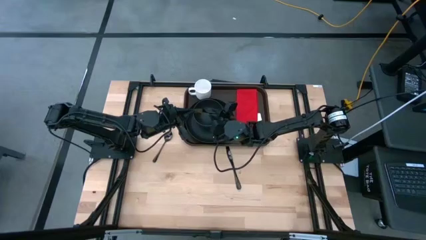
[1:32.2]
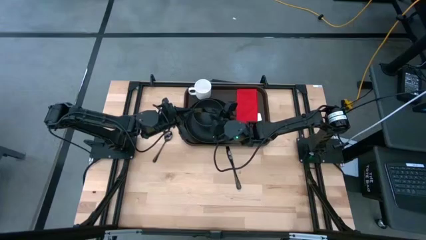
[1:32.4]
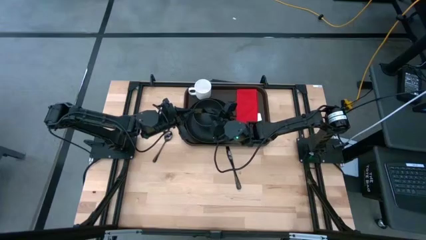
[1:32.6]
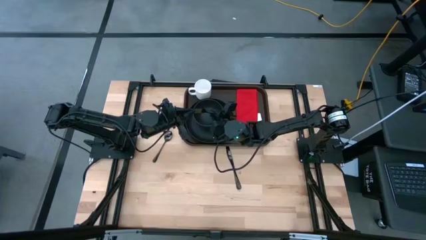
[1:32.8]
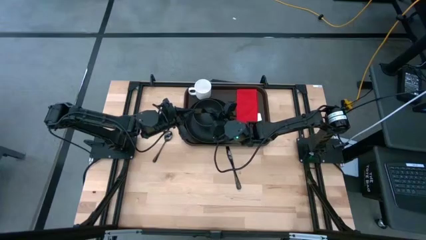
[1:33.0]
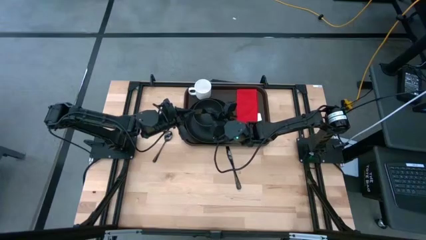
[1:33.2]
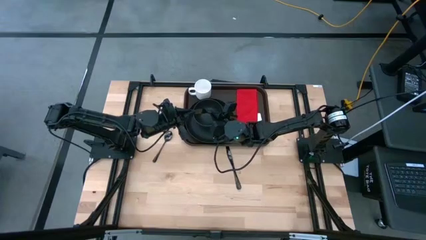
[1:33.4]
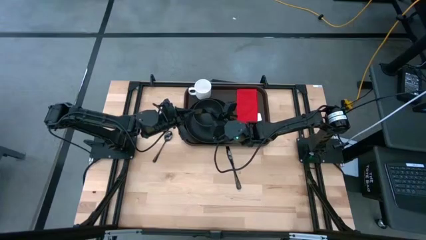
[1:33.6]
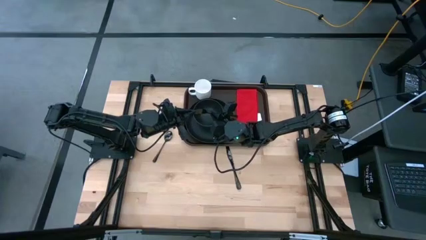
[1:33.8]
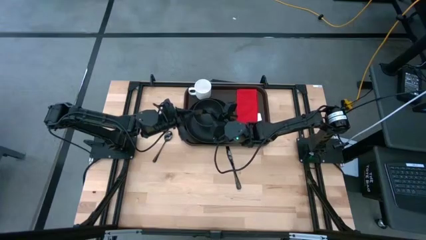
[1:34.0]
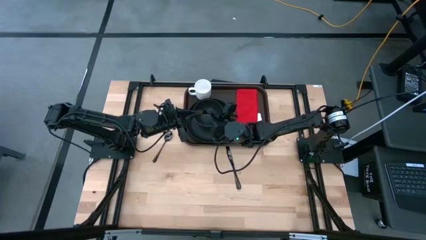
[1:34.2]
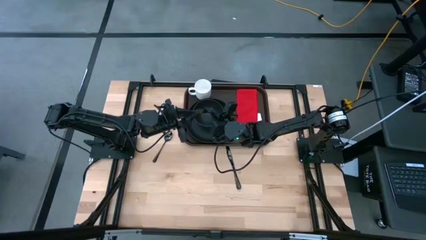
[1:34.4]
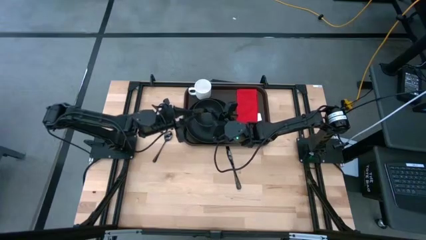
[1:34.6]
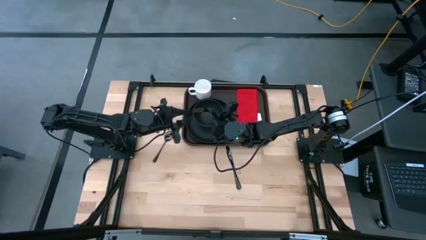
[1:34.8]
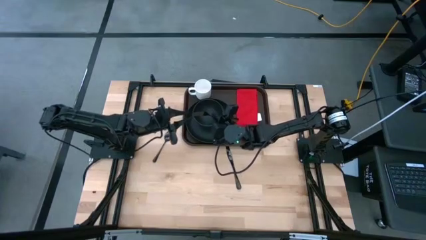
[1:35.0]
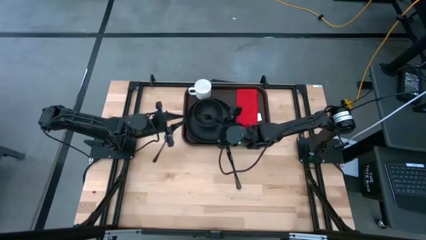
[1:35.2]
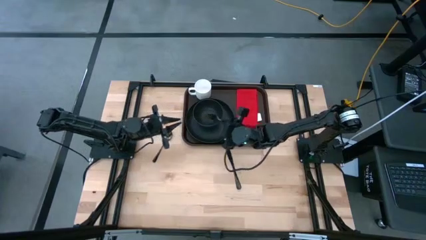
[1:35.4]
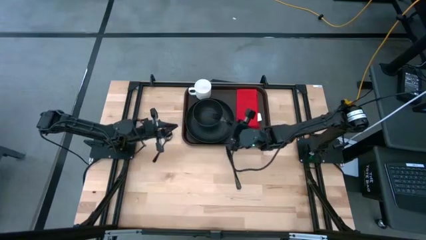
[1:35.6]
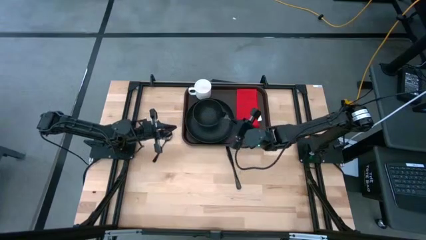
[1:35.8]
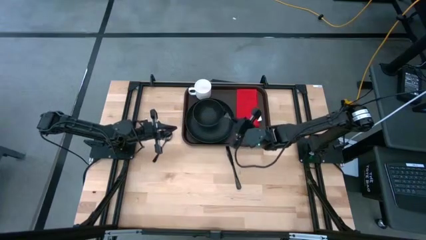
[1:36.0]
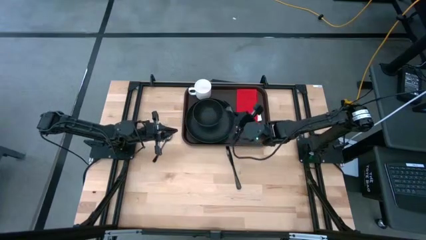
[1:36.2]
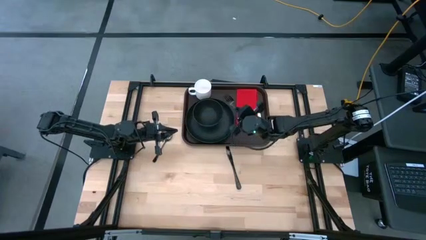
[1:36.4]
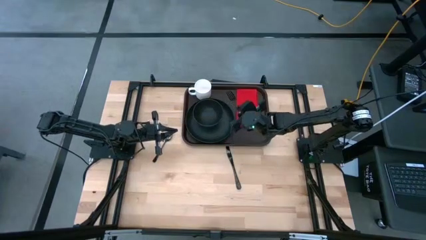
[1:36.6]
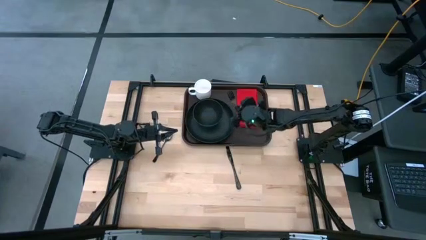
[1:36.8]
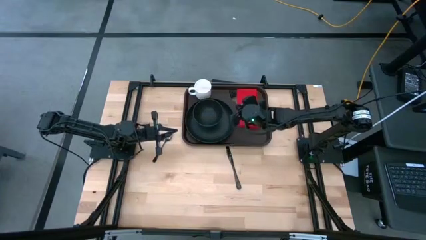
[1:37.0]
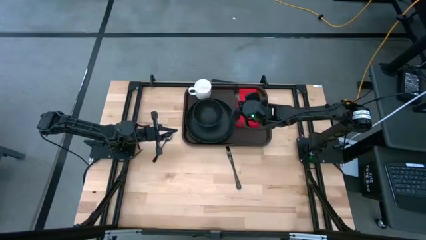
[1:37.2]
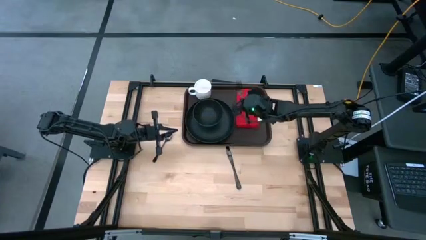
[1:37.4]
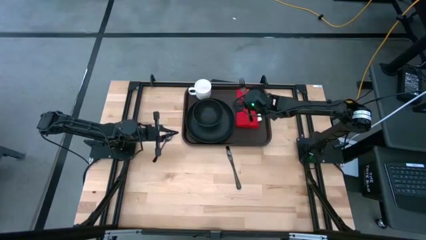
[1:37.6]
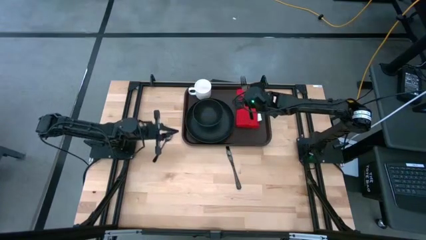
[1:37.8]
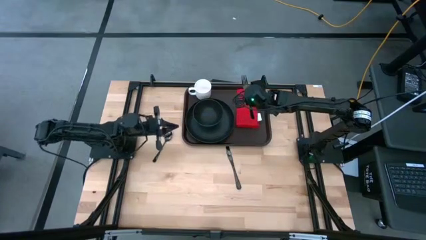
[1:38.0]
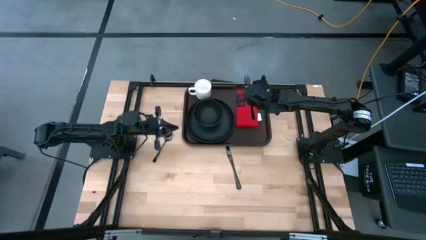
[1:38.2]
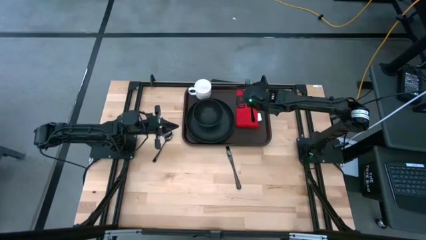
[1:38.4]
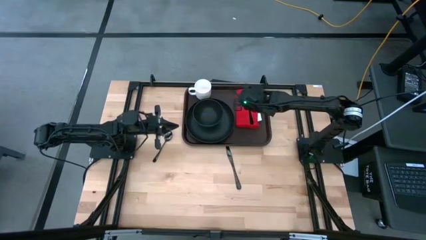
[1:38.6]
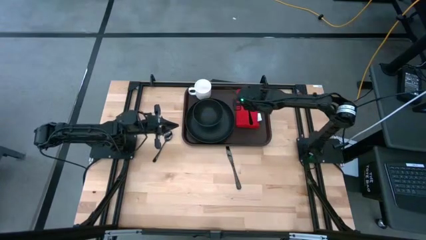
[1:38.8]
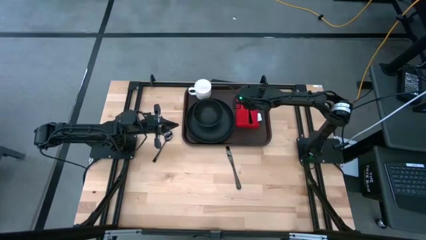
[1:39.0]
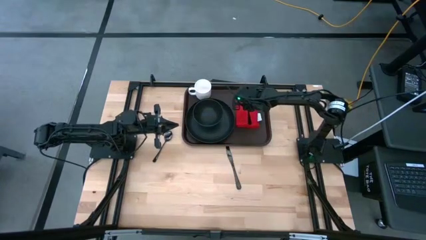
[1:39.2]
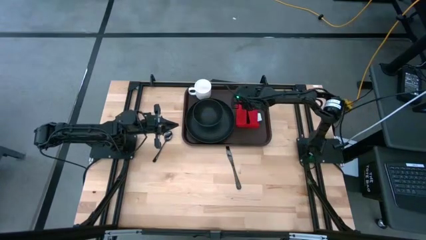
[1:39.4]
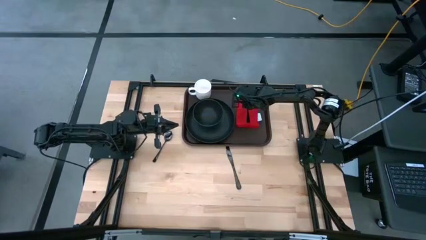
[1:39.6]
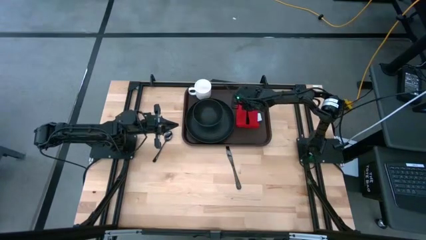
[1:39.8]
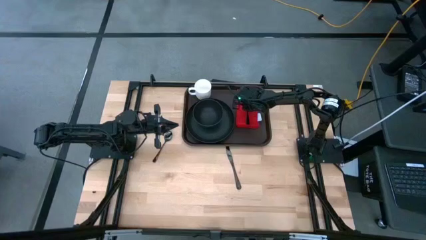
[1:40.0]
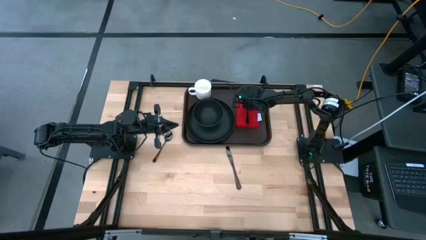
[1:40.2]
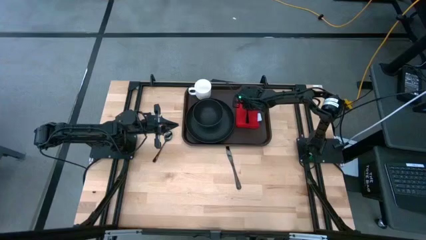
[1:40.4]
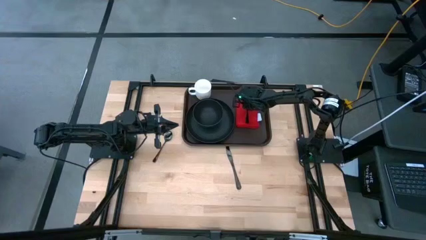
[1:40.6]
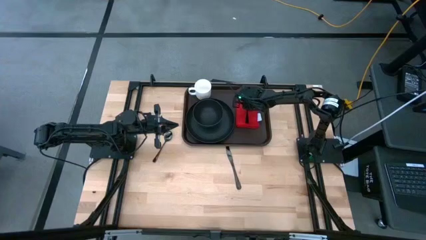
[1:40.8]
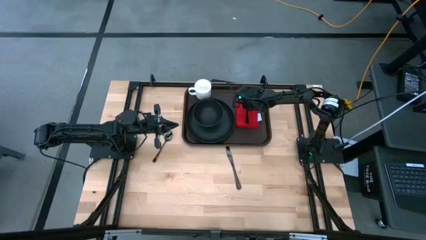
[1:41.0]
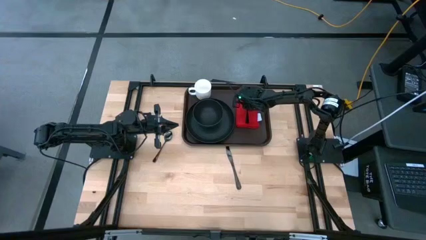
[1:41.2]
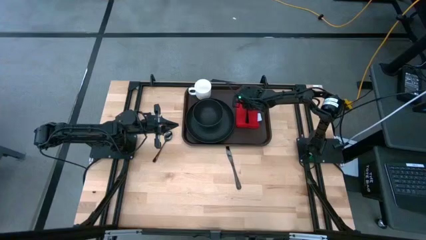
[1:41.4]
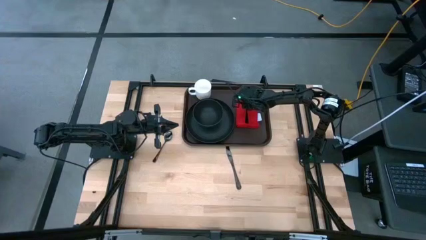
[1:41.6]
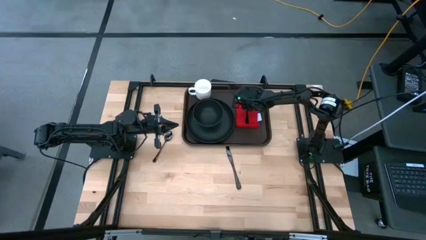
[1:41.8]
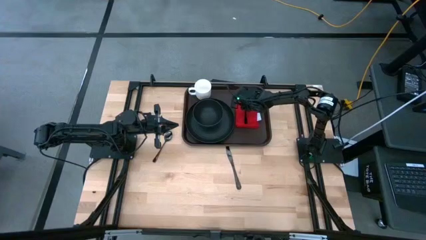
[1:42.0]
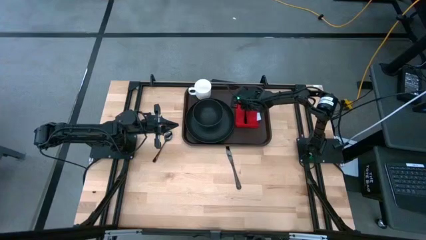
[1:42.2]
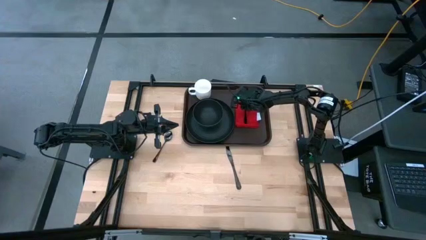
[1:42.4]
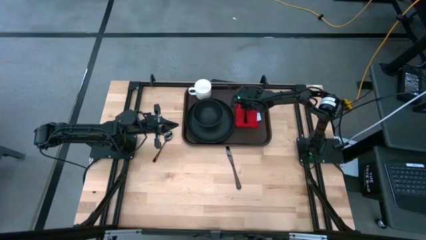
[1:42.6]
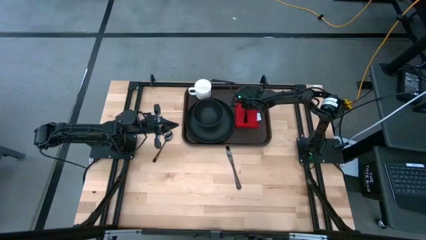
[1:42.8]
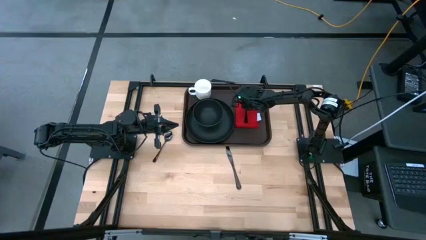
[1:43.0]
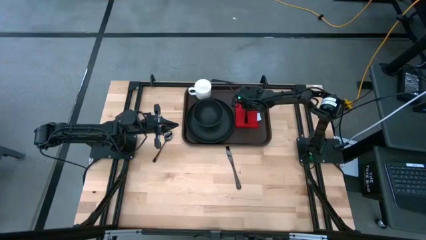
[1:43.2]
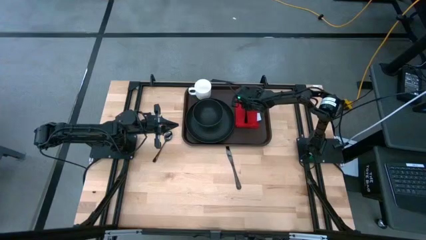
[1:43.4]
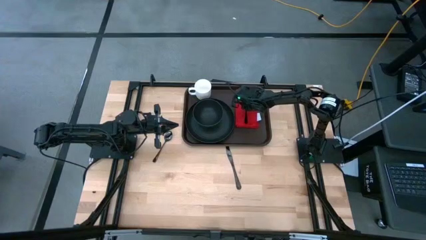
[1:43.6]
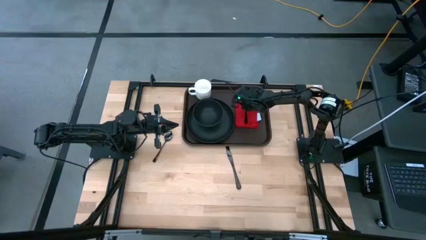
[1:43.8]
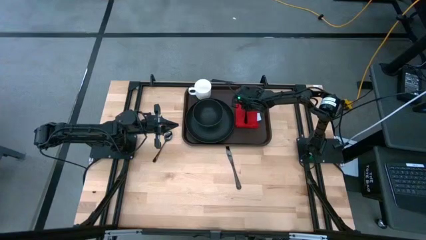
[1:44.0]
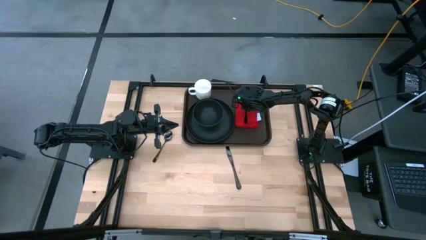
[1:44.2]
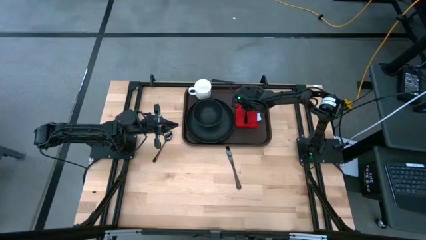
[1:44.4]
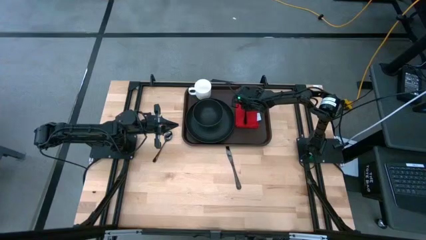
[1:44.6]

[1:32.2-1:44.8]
Task: Set up tray
Put the black fork on the red table napkin
